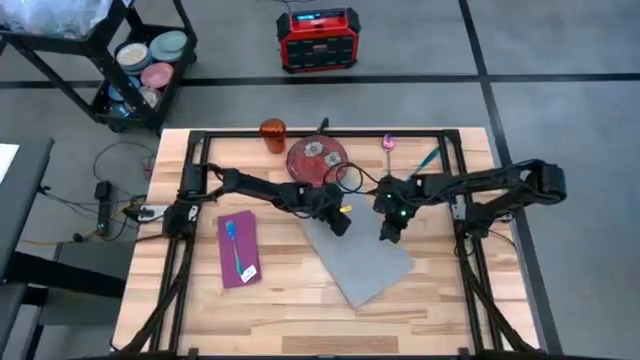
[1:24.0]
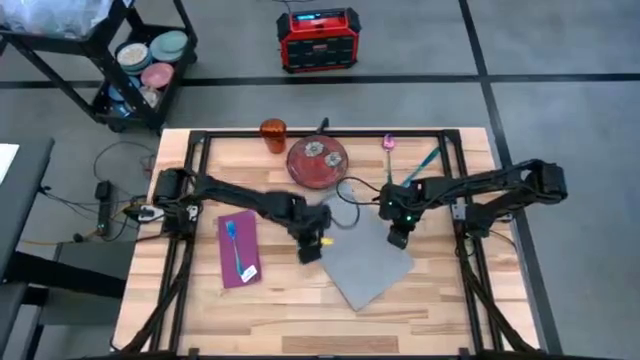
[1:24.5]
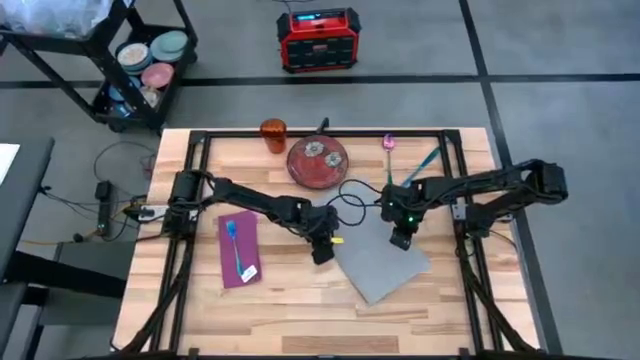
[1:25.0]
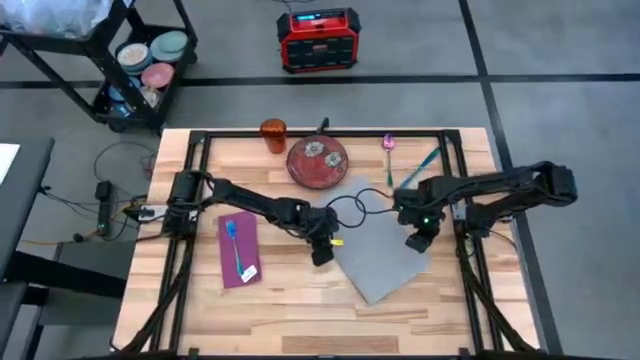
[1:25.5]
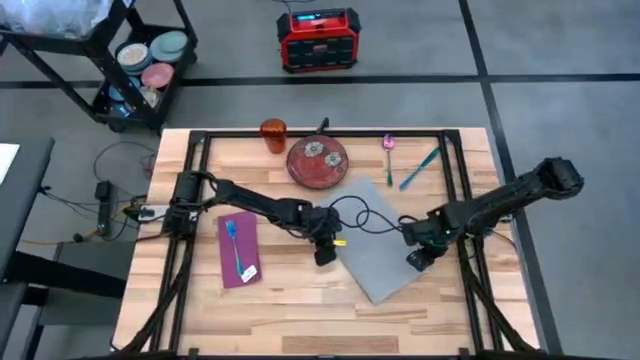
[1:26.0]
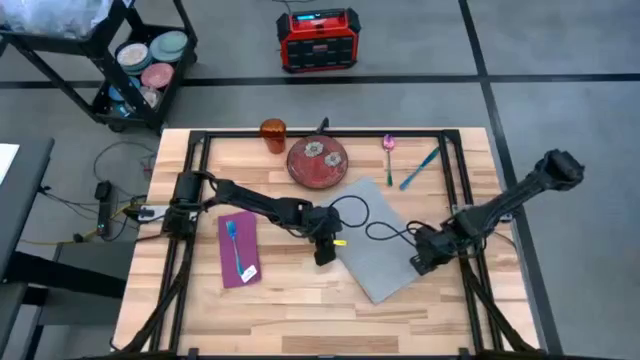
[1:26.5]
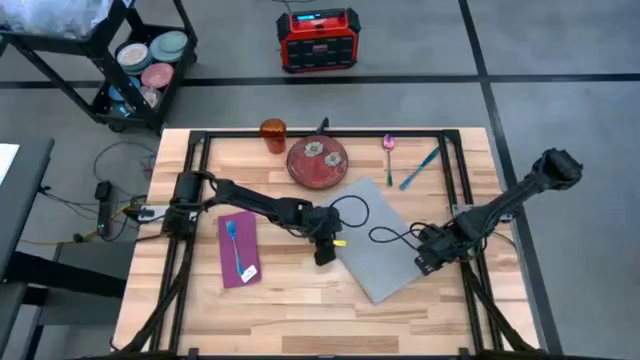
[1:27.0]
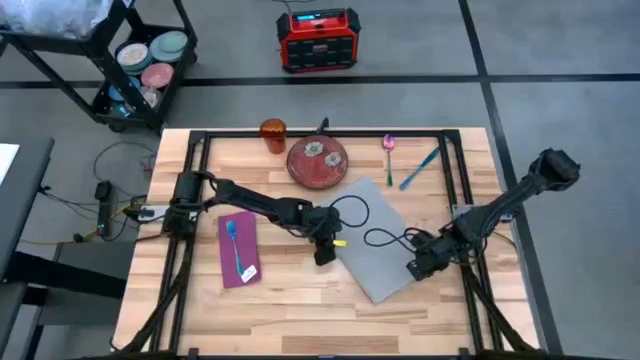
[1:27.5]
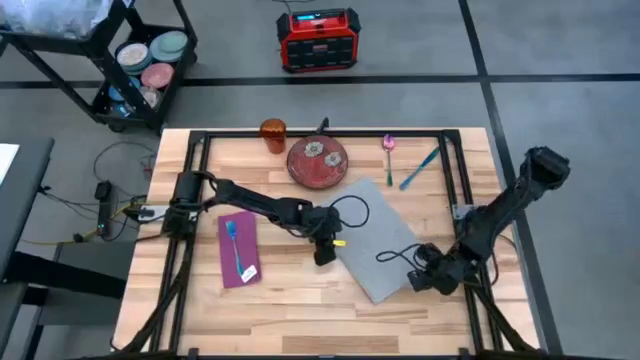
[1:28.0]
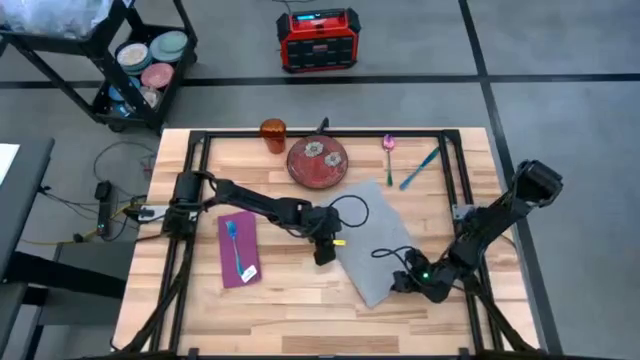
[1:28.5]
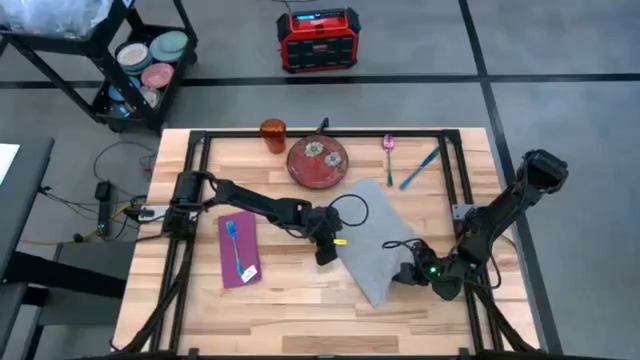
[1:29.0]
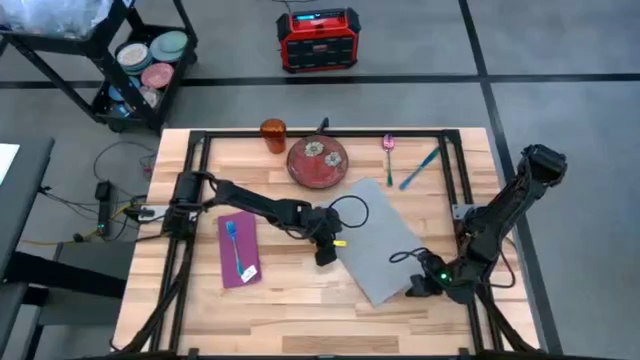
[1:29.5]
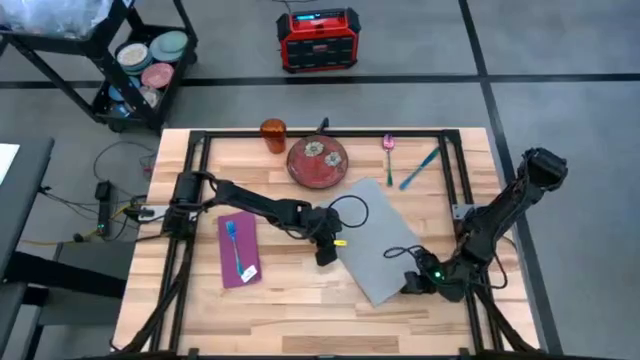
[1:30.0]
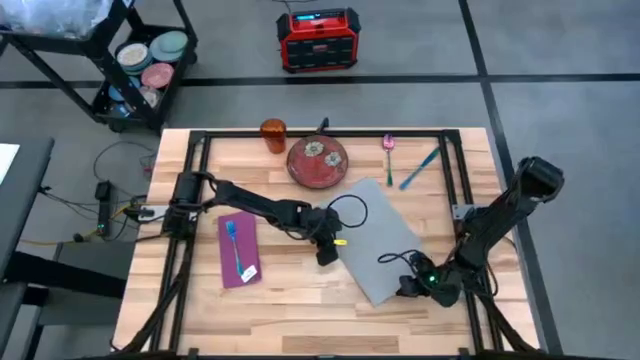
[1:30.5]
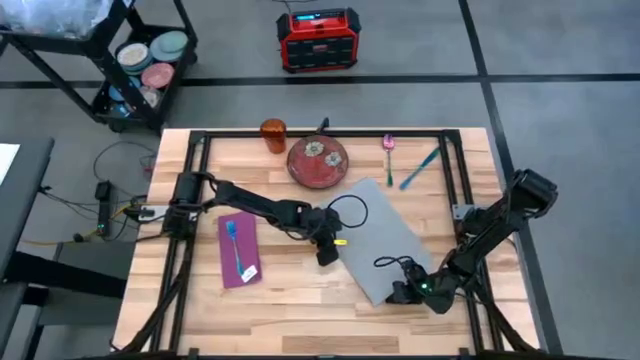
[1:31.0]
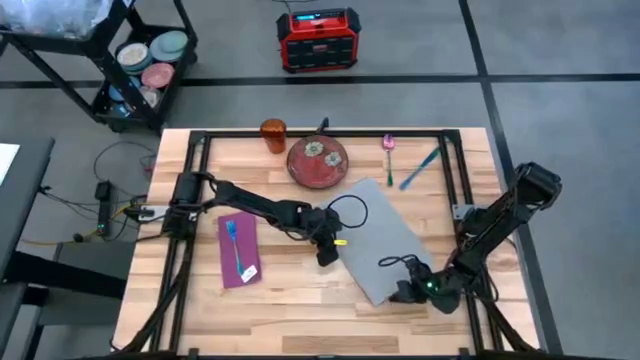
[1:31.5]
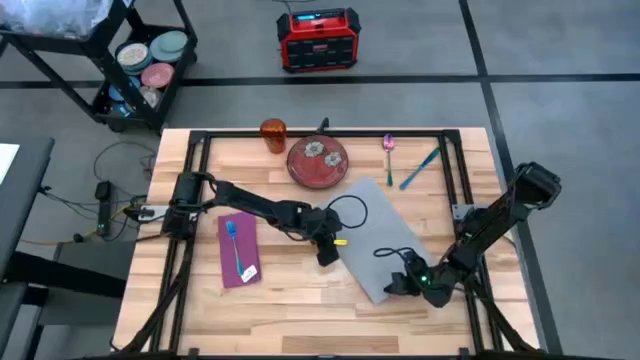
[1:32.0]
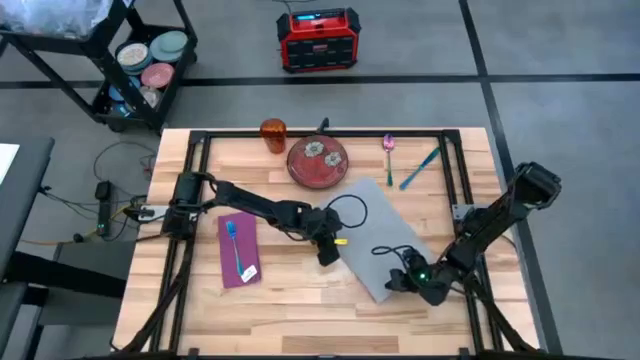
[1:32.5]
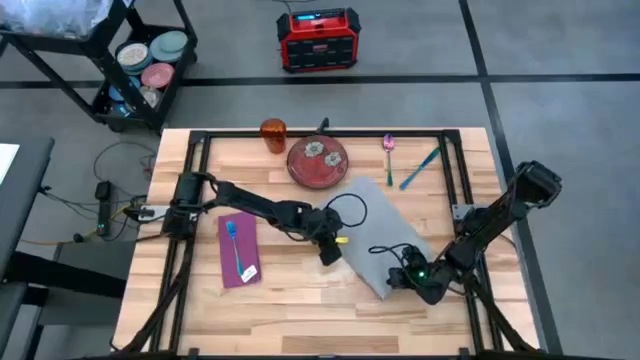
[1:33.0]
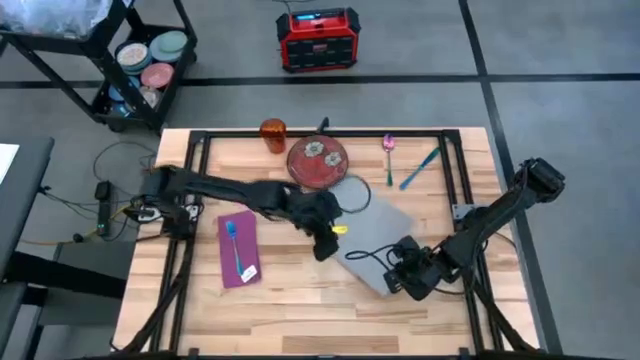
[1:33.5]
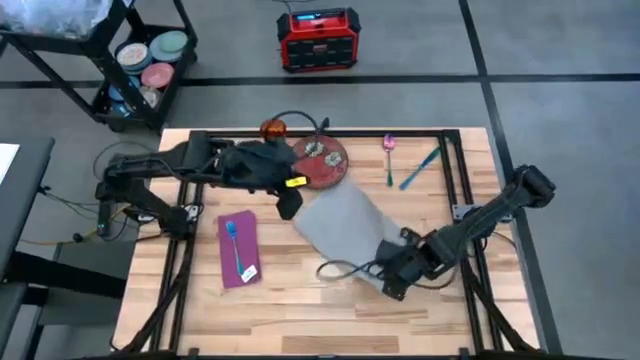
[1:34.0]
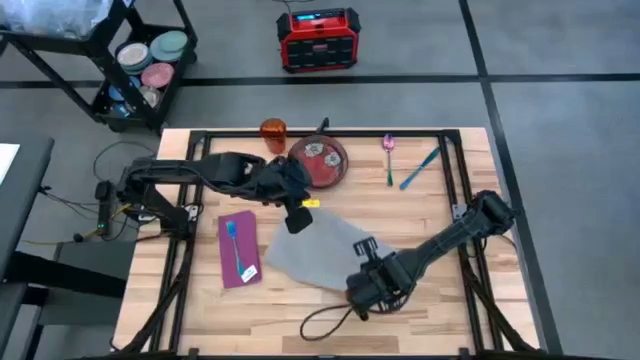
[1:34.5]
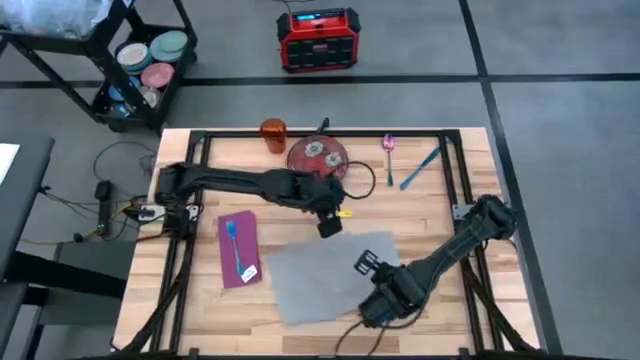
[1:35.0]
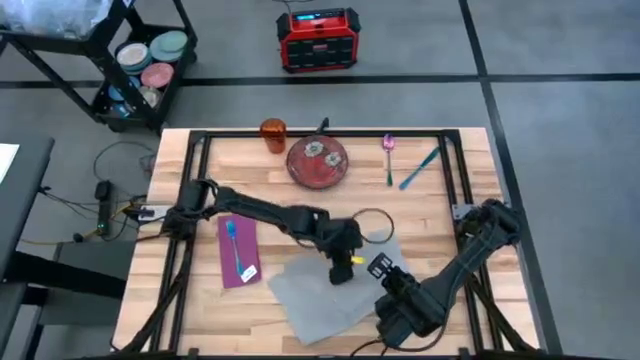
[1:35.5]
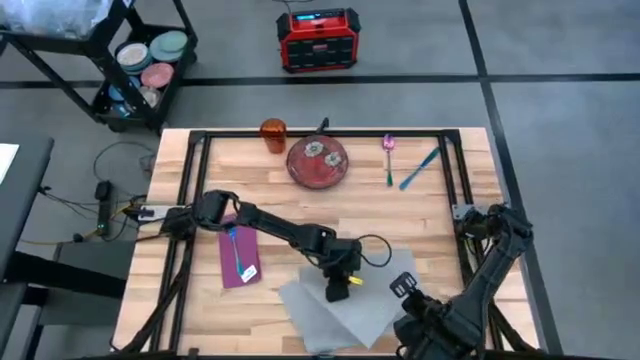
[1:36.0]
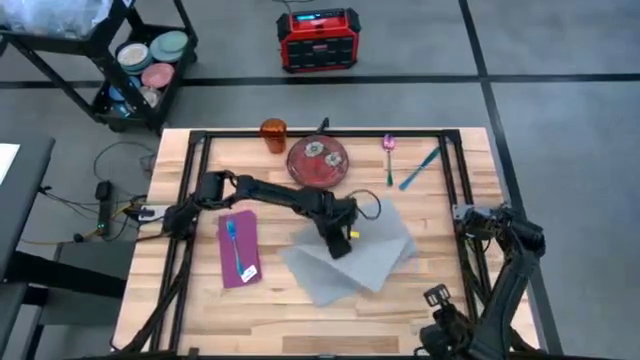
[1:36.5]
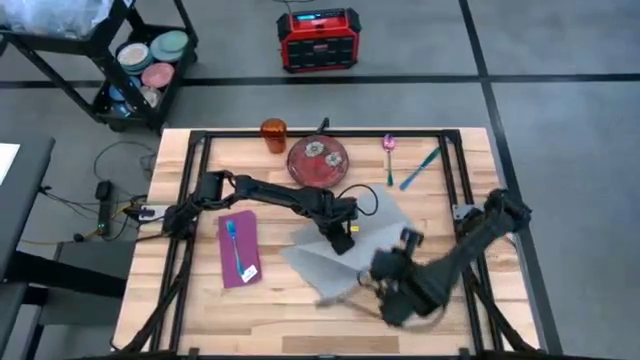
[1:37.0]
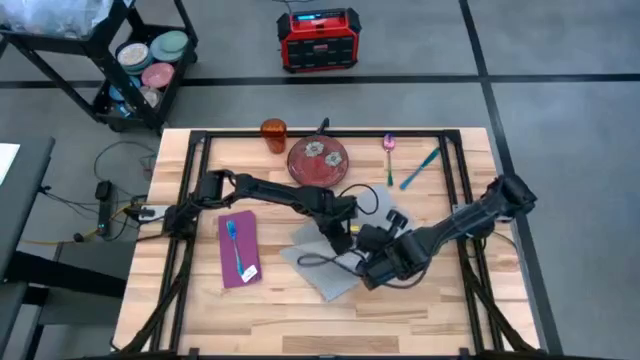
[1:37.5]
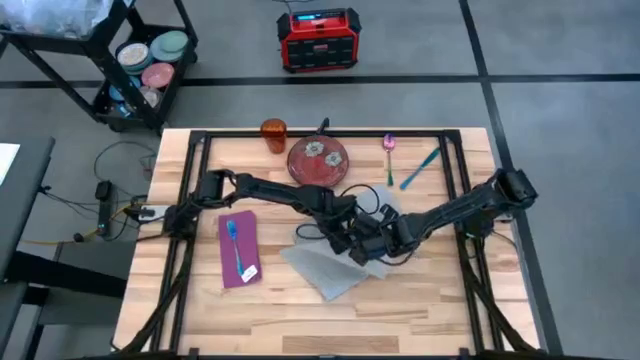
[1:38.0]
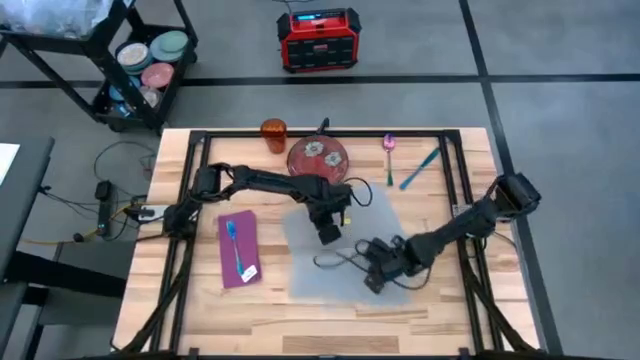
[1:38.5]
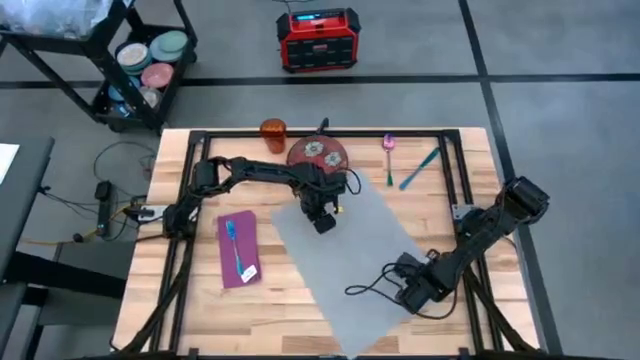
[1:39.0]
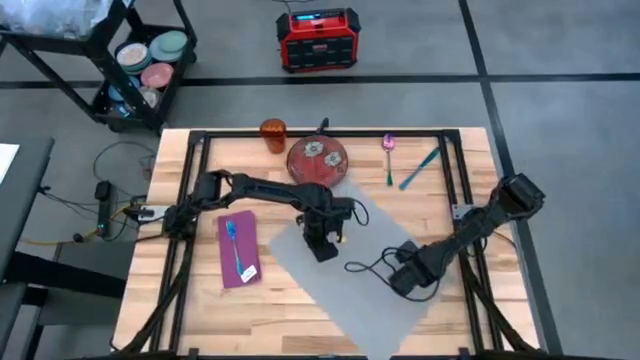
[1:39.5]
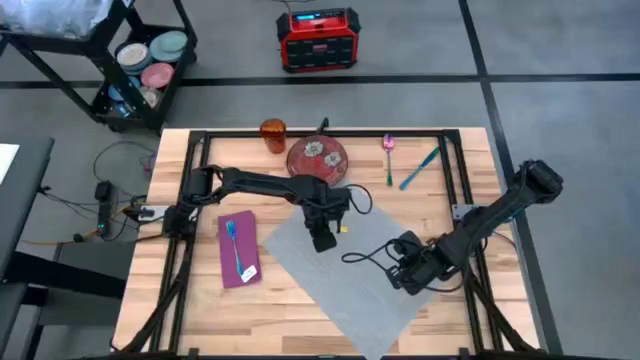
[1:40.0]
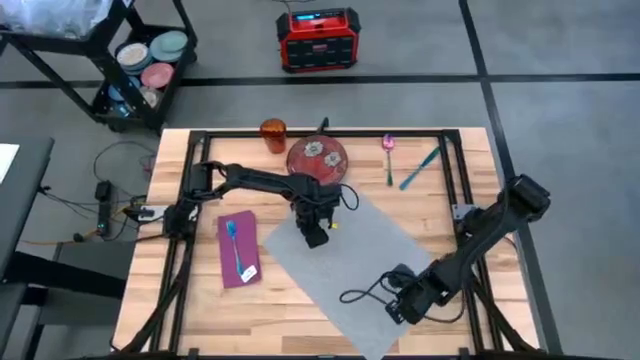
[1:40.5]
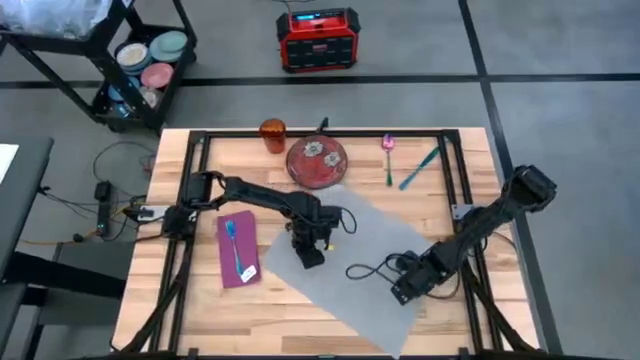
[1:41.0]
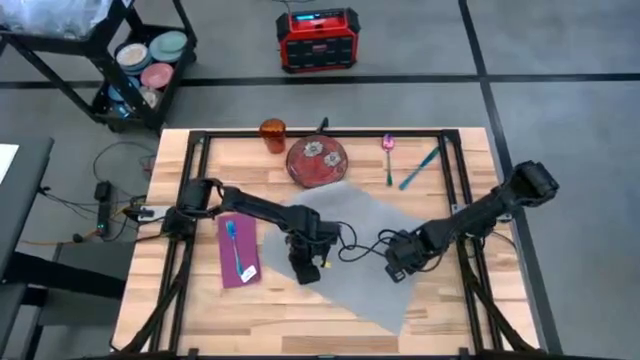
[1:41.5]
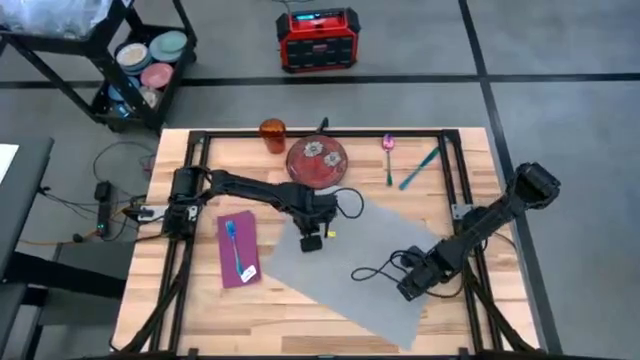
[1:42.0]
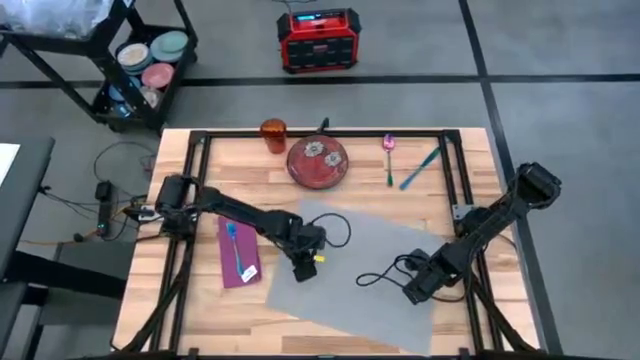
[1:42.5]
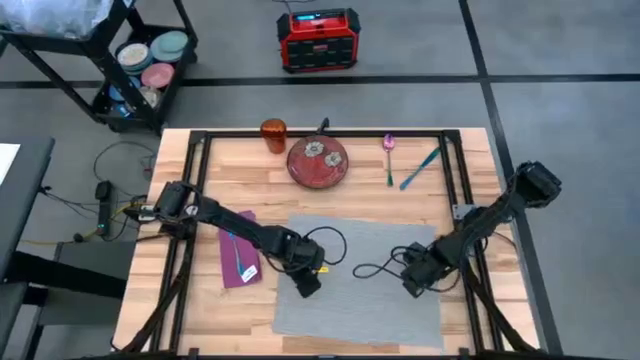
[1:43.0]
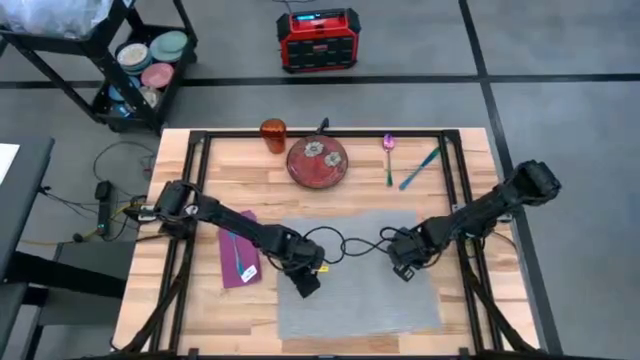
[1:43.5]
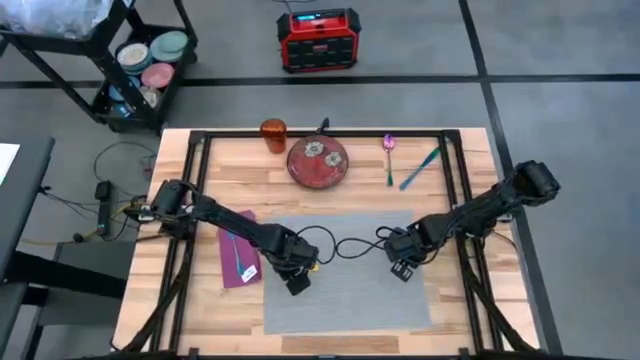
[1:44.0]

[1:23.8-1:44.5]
Task: Set table place
Prepare the gray placemat

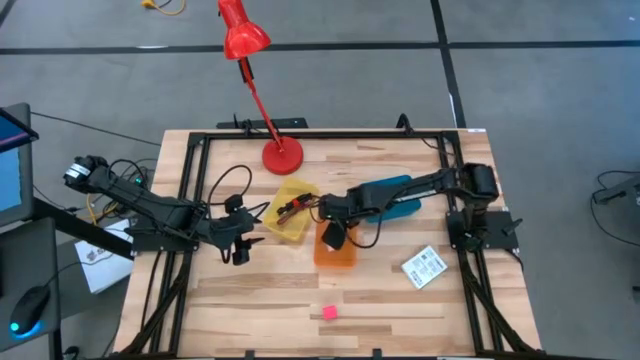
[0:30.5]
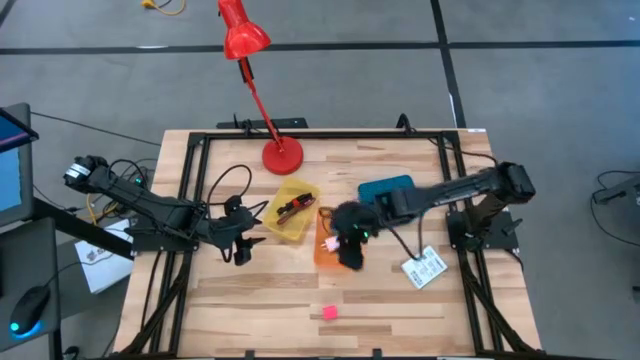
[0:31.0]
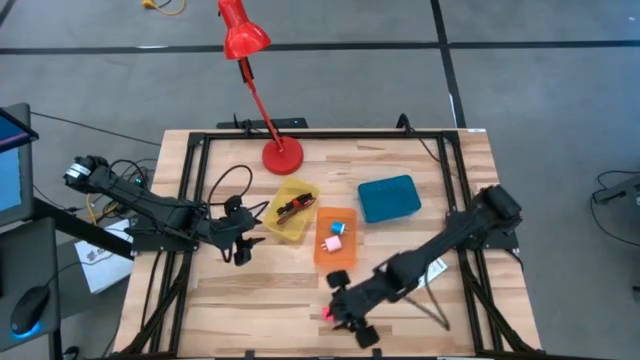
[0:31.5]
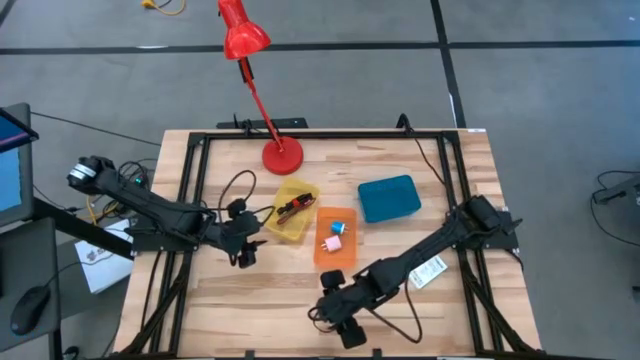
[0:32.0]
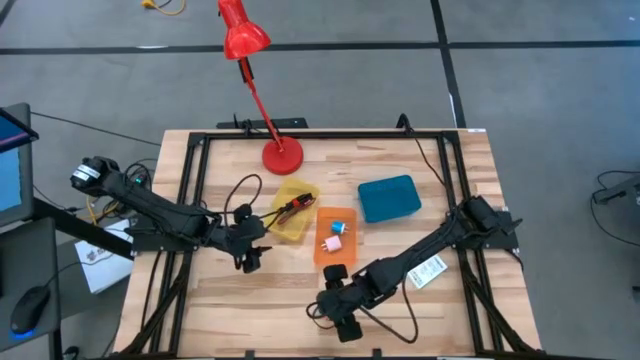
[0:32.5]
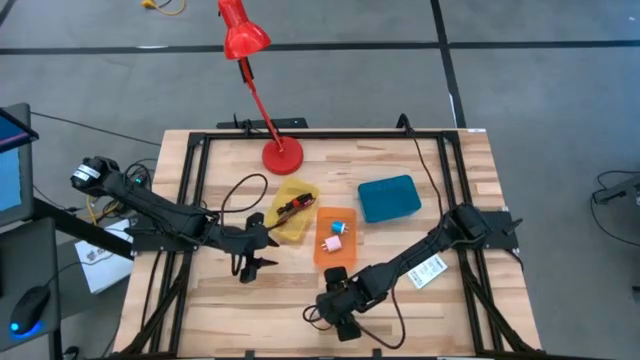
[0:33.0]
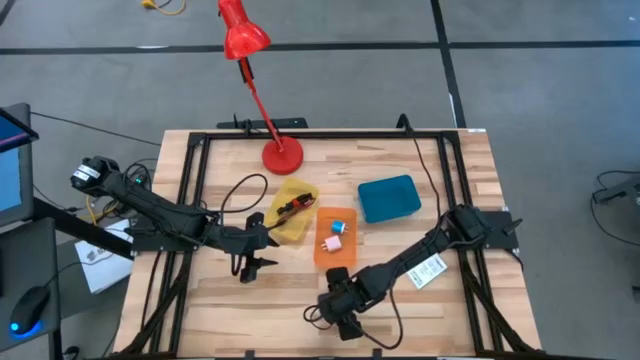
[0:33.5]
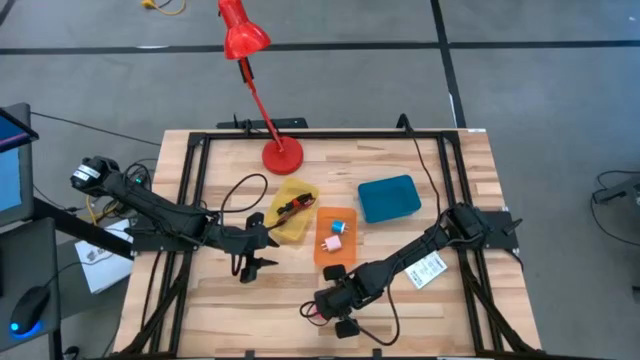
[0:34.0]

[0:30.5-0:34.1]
Task: Pick and place items into bin
Put the pink charger adapter into the orange bin
